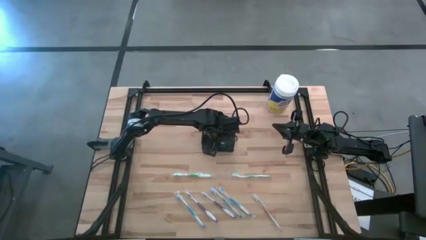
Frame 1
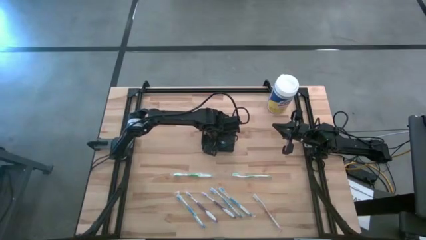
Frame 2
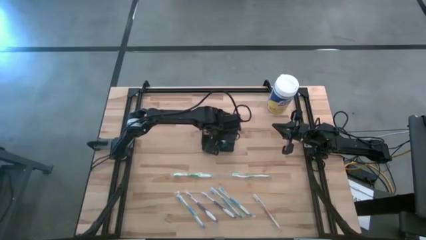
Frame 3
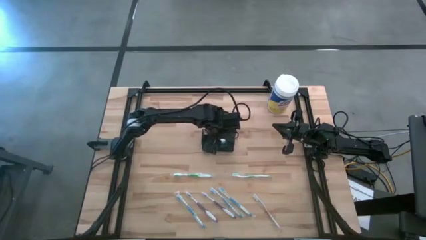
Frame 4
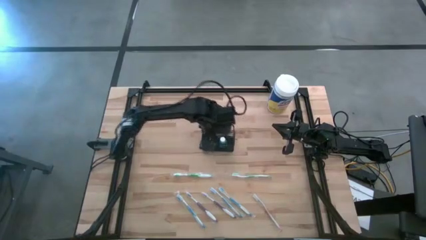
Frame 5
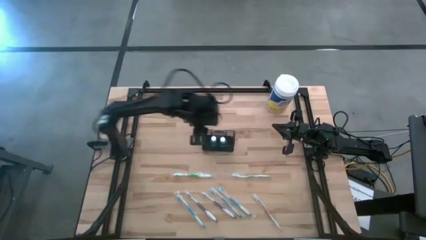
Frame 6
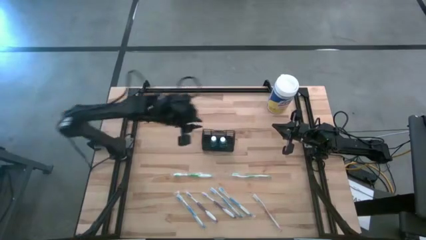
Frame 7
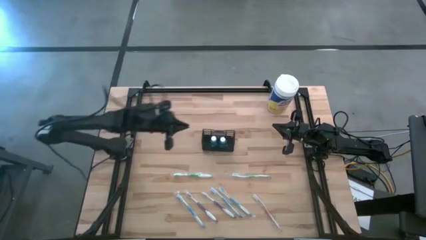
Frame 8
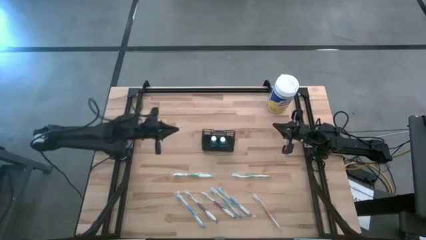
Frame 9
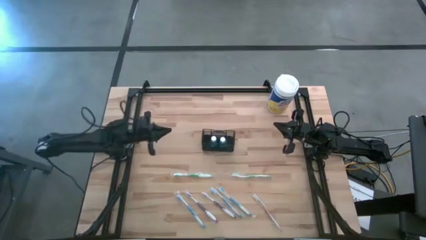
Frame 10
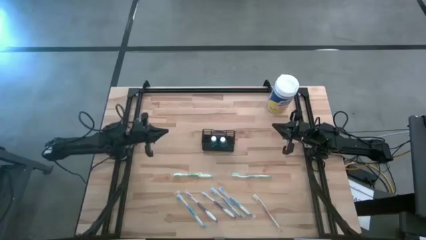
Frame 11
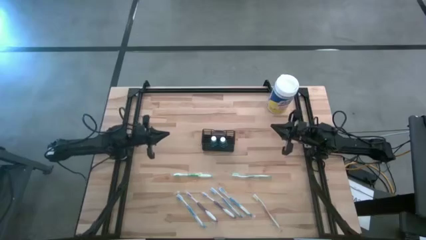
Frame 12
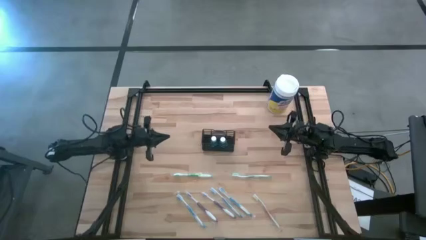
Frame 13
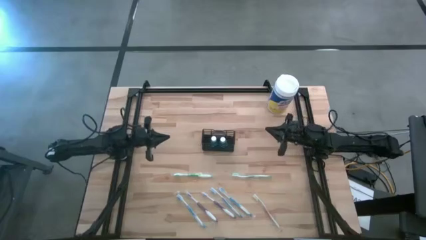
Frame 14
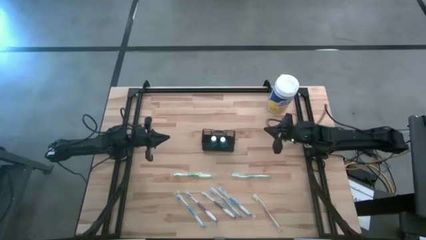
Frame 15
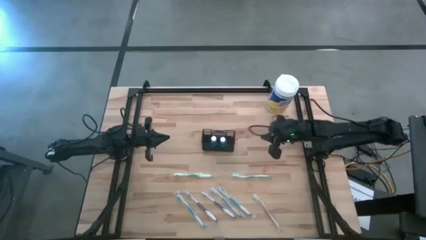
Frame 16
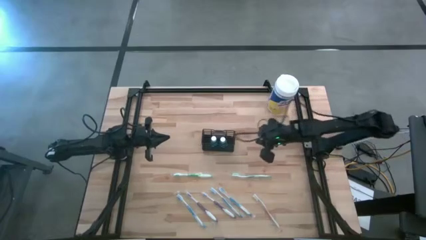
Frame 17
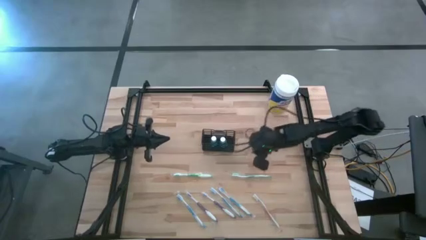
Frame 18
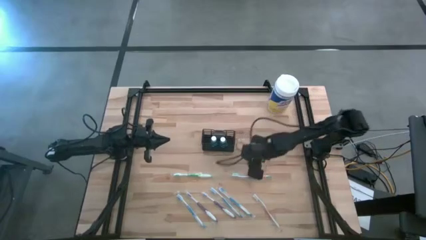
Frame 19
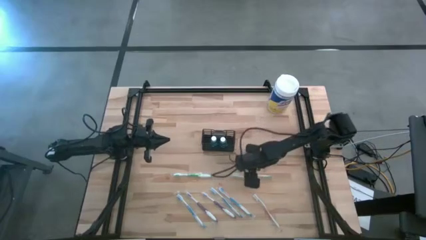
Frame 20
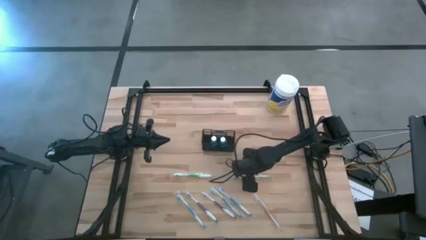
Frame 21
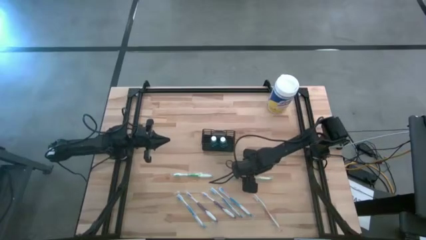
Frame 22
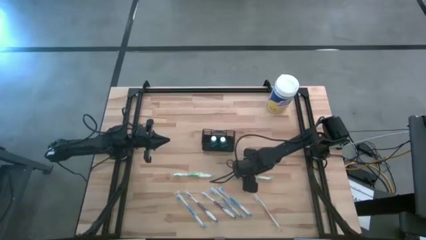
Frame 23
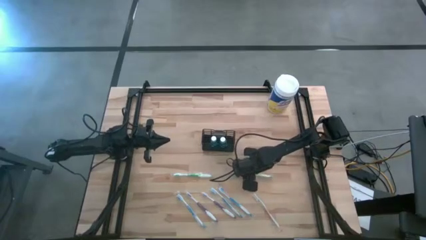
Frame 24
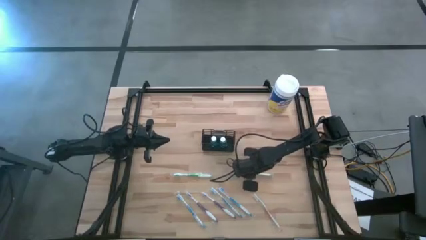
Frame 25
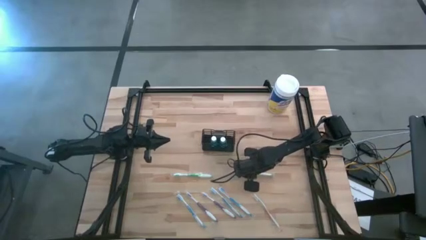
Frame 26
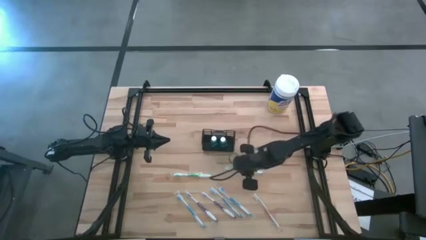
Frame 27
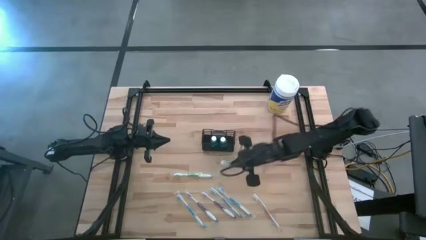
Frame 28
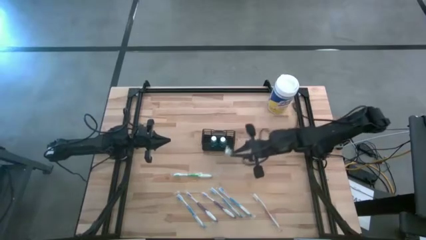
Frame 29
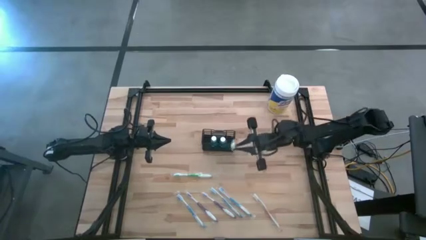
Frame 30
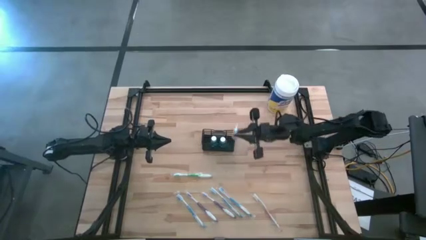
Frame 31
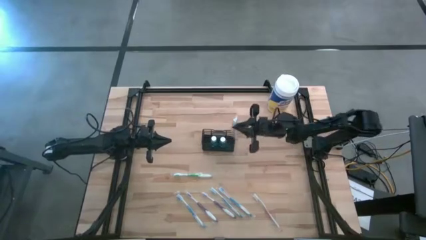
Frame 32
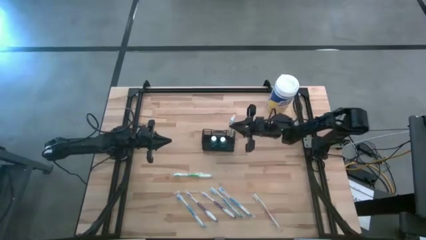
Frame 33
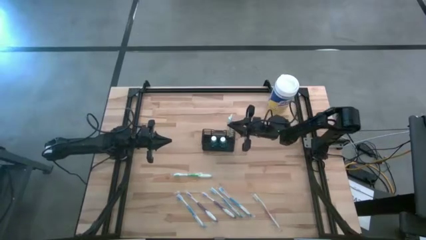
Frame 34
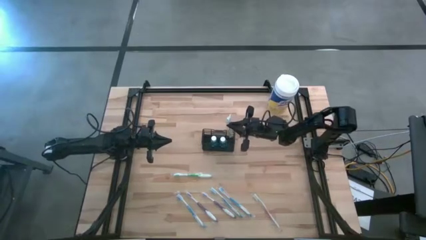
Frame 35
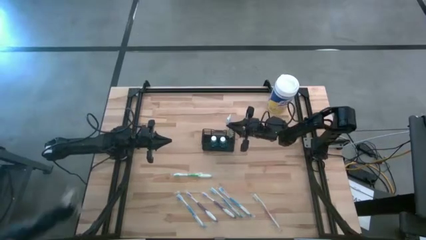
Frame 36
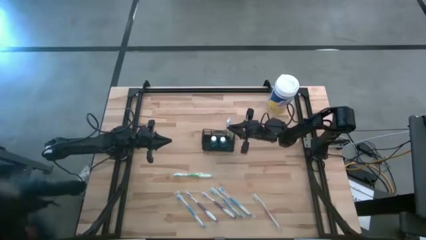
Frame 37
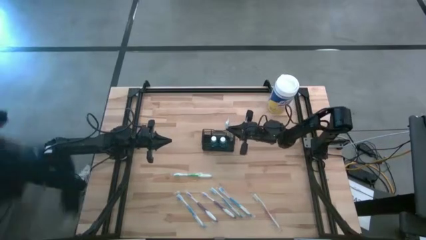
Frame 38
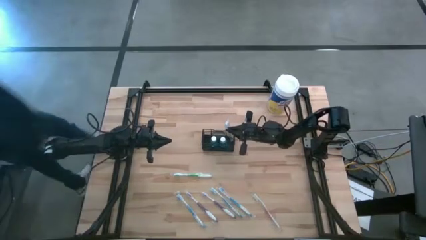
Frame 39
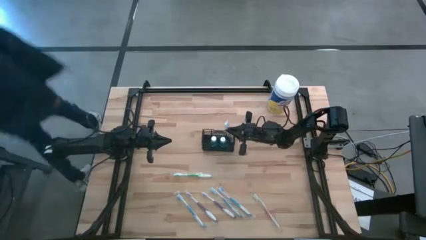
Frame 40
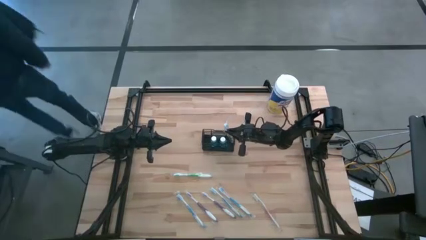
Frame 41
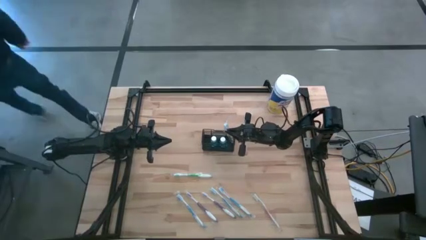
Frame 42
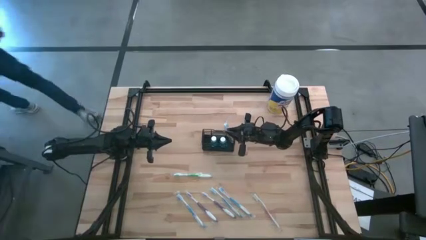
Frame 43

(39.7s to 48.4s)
Task: Pick & Place toothbrushing station
Put the right green toothbrush into the wire organizer

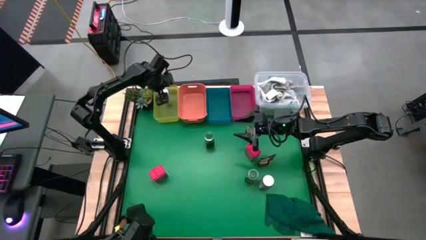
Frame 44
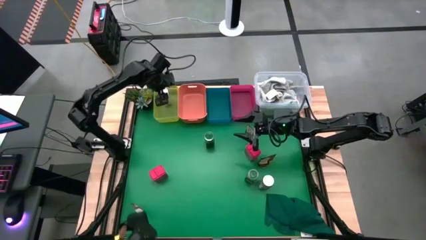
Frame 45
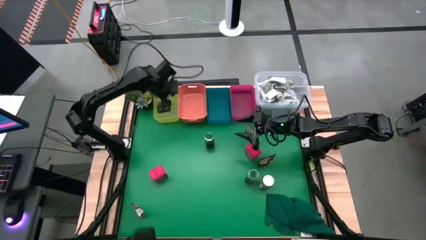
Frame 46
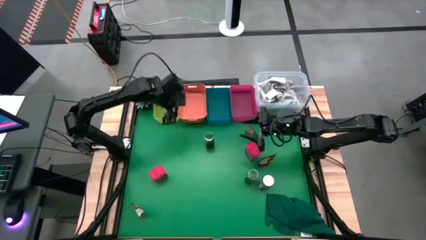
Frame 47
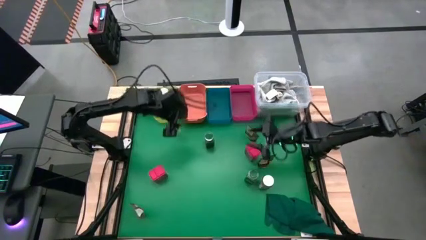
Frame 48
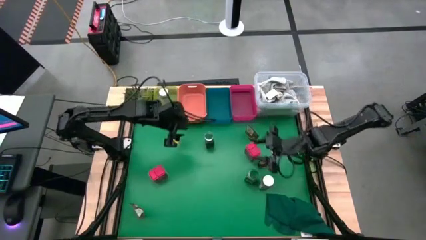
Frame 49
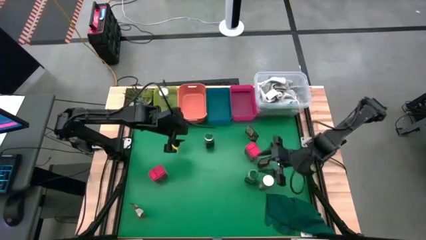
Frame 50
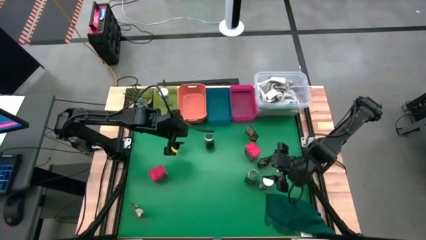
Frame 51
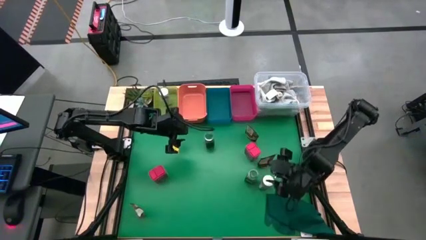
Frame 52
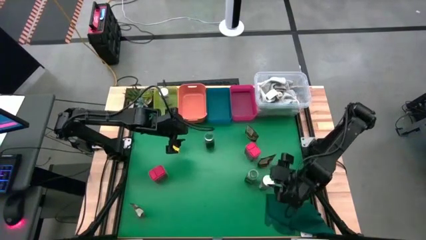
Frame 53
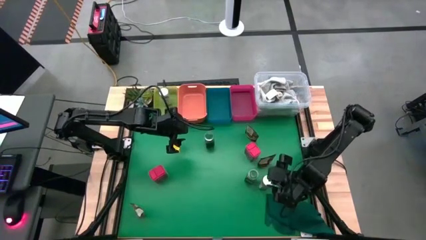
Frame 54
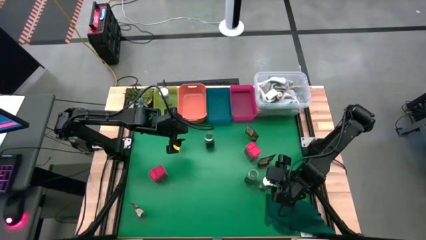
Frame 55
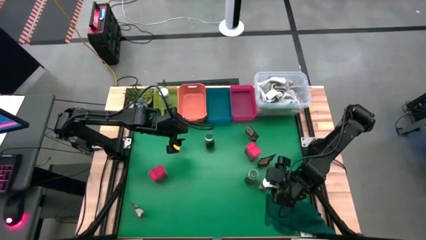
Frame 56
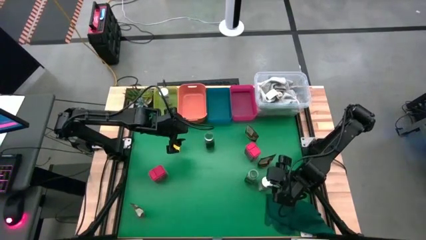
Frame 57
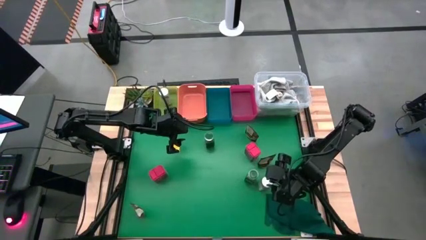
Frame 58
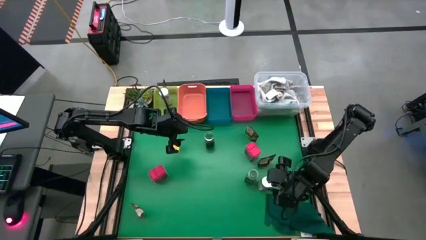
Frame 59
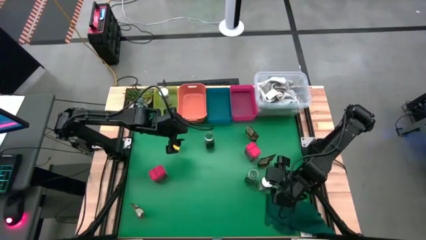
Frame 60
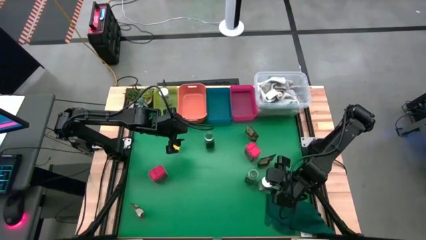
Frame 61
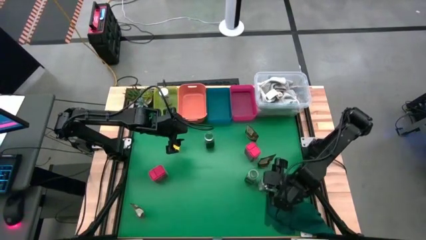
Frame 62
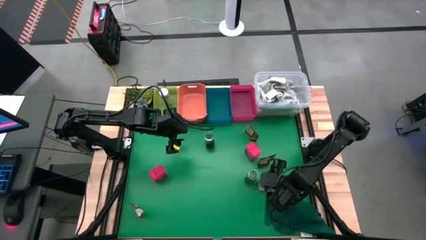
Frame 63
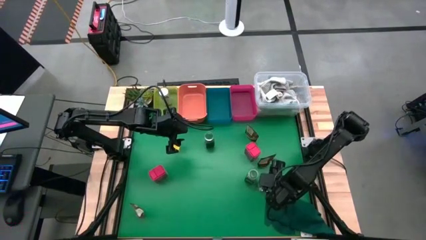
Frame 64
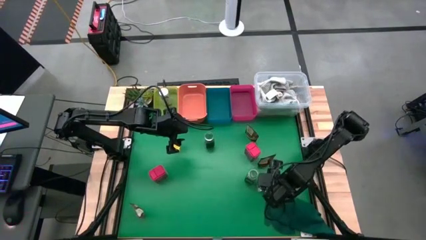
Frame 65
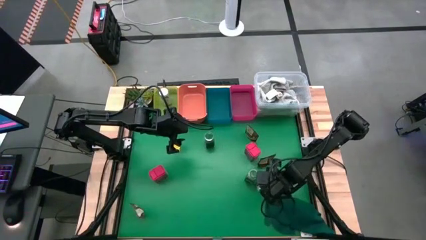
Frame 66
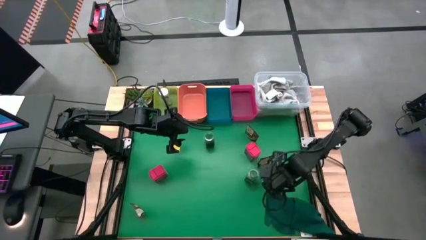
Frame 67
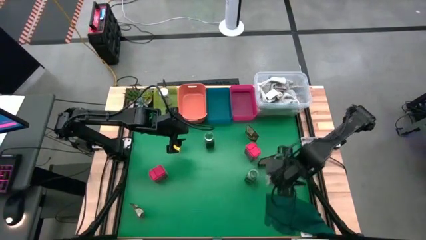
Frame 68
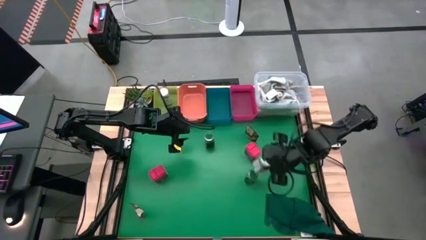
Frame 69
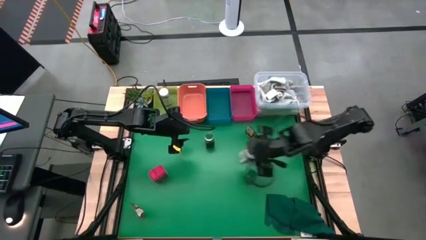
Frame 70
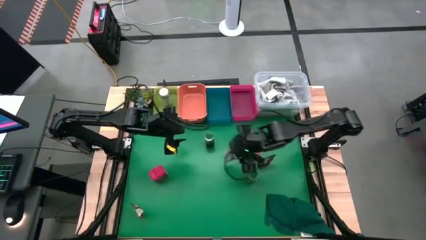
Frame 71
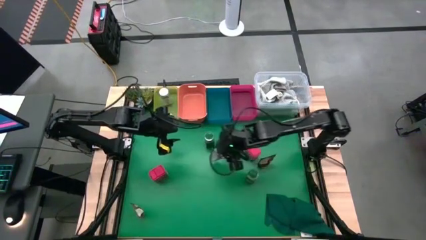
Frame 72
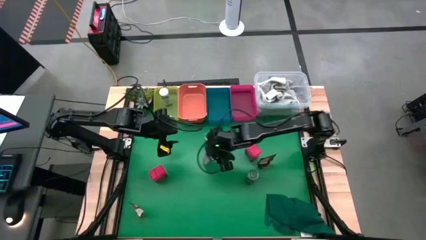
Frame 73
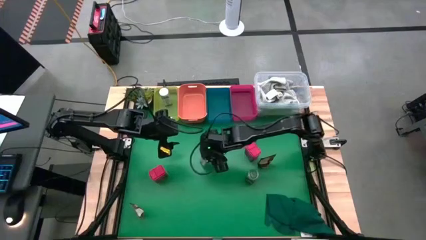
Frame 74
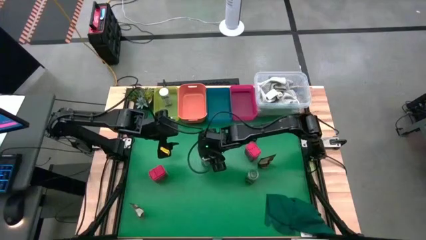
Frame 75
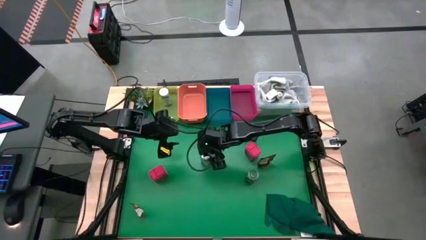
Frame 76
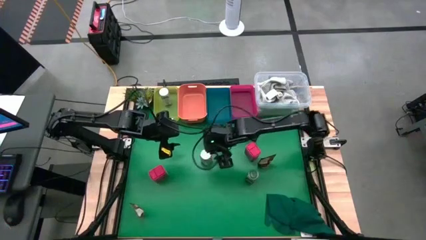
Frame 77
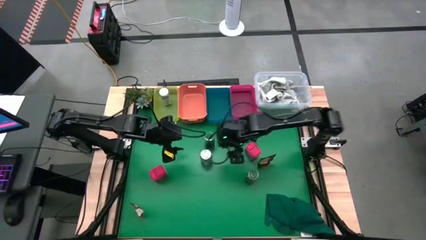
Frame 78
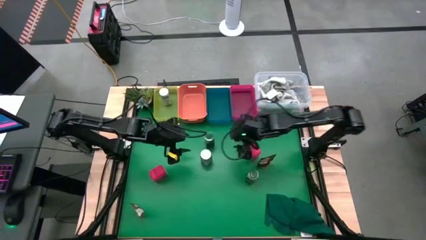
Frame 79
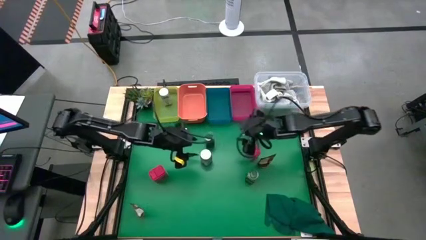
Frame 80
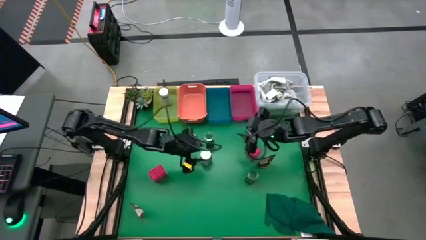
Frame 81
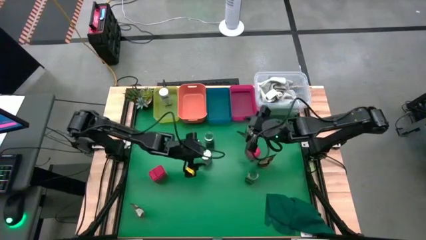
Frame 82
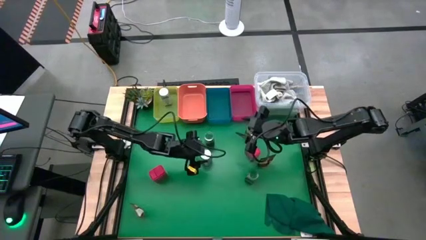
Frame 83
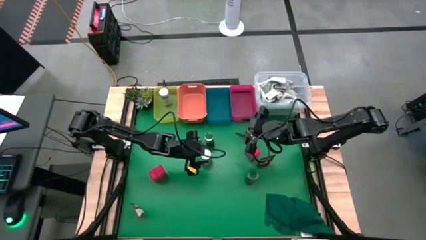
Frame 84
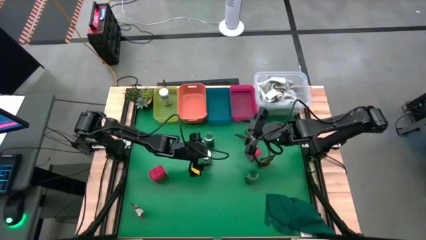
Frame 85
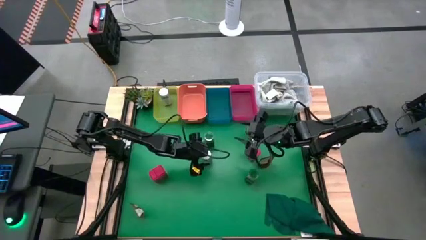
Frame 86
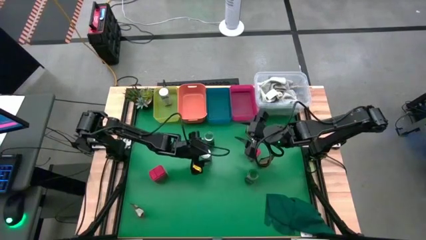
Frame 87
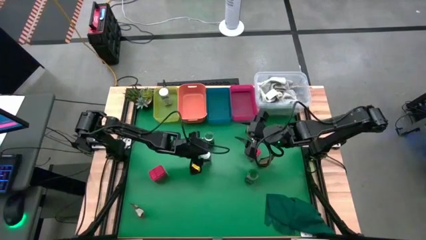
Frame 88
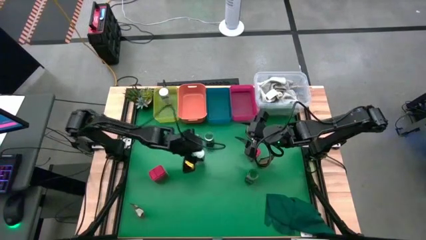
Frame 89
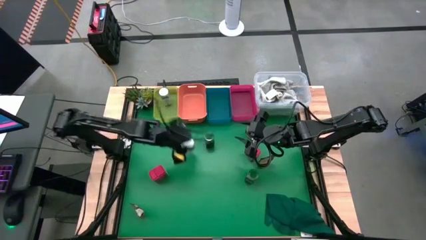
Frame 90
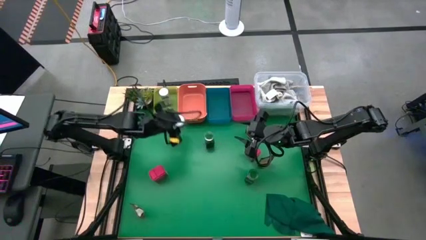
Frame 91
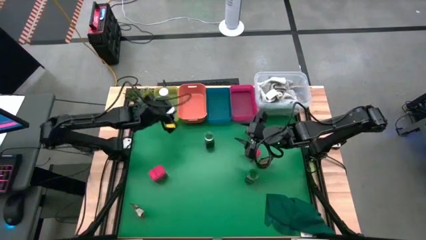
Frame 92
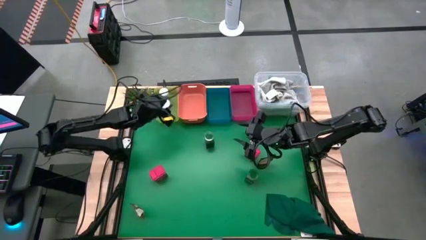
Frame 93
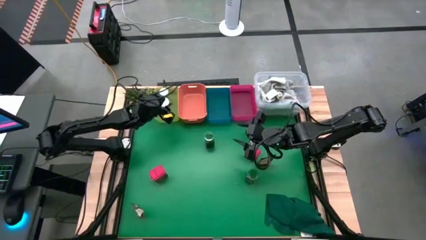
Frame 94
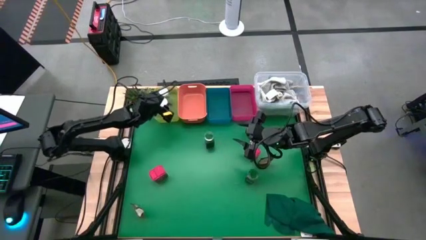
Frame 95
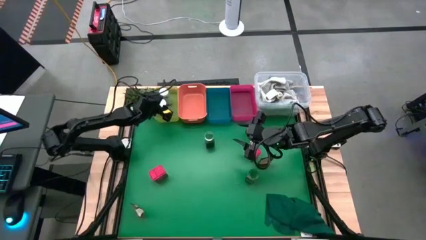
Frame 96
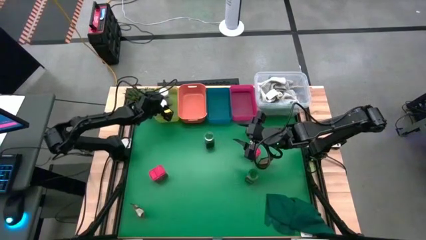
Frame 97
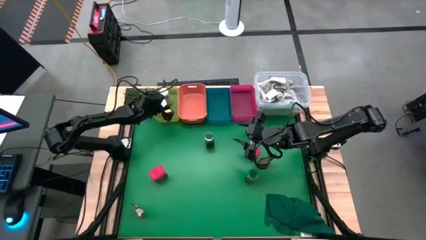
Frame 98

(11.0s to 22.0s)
Task: Sort spices by type
Put the white seasoning bottle into the yellow bin
